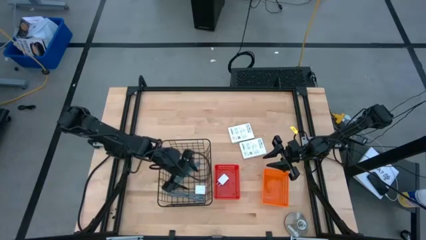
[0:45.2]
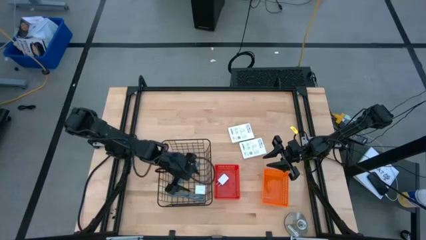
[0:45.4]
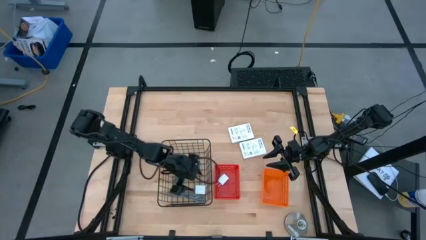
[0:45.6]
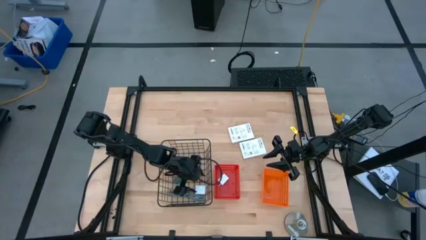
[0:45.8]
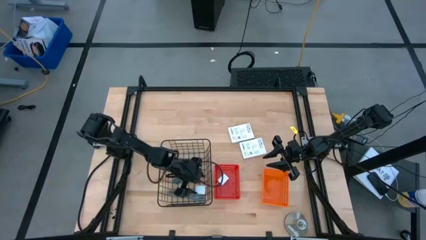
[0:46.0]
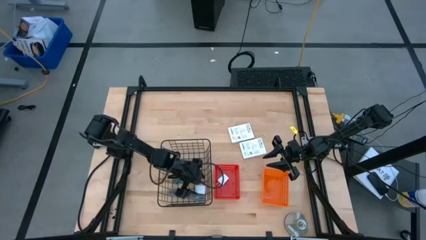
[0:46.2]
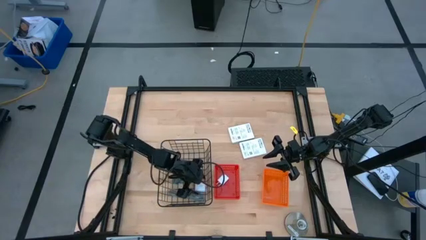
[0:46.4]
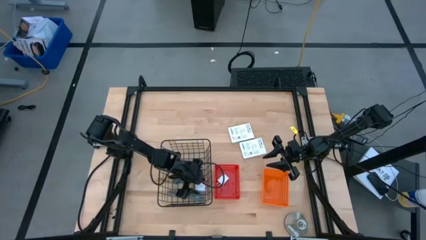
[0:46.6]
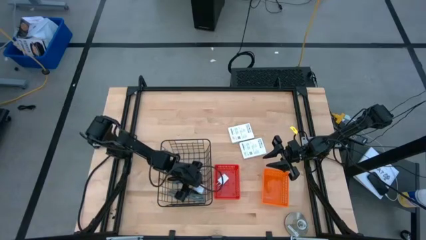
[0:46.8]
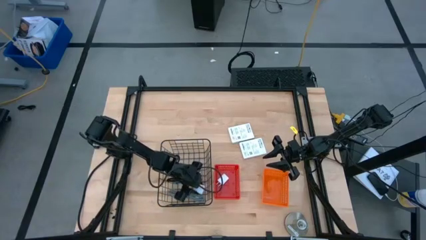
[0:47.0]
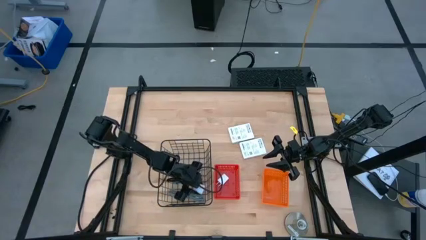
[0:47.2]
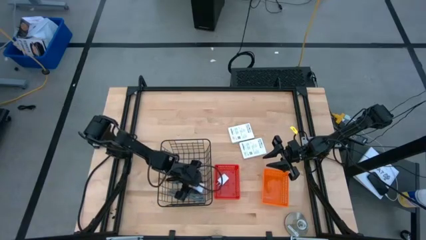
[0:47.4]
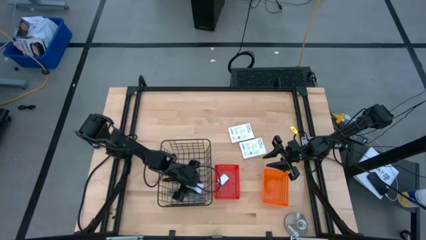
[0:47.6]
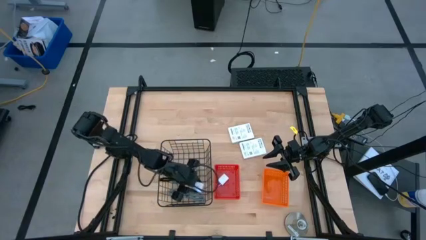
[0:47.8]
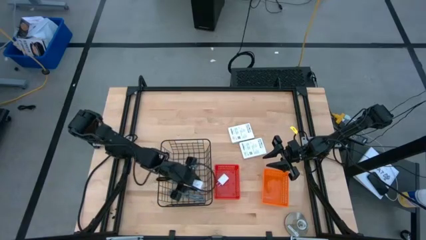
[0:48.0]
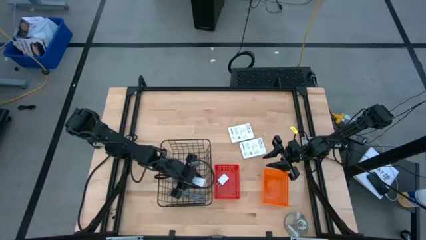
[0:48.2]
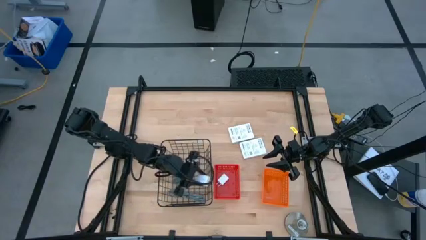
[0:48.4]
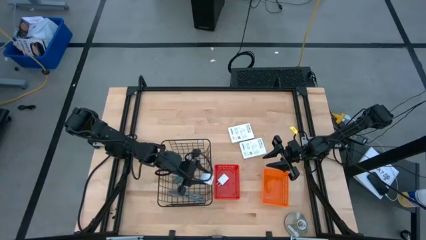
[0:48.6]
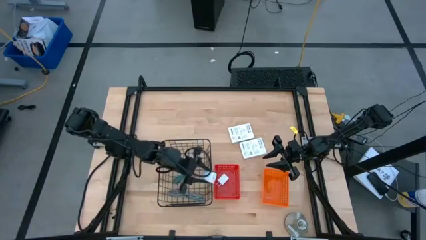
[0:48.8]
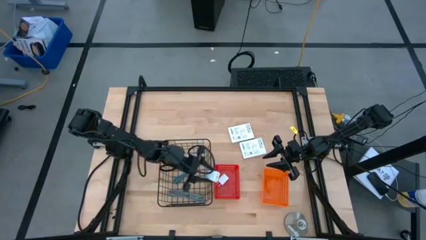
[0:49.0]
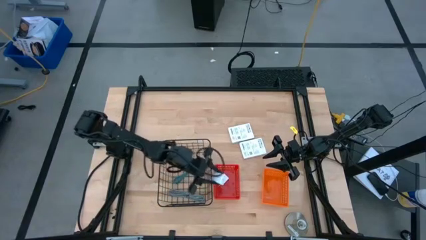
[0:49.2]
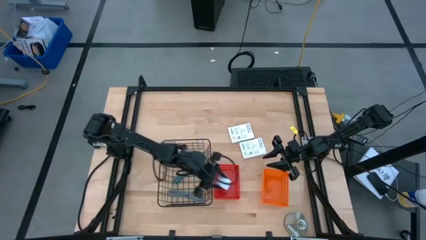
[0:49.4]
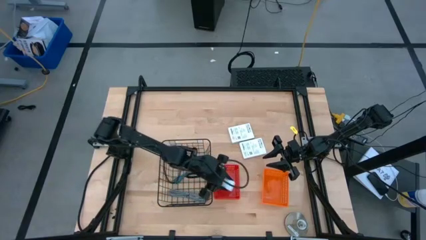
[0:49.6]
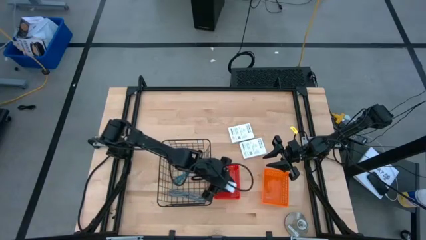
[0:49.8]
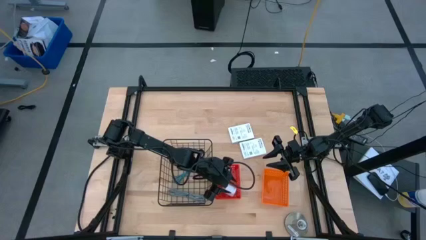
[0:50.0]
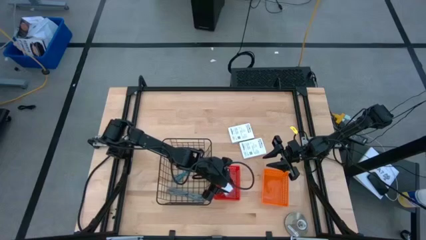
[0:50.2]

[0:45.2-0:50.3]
Task: Pick and place items into bin
Put the white charger adapter from the wire basket into the red basket

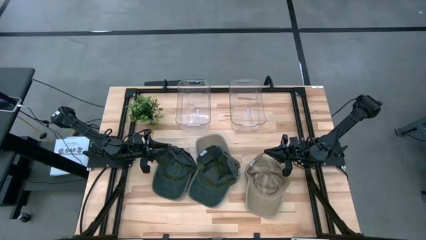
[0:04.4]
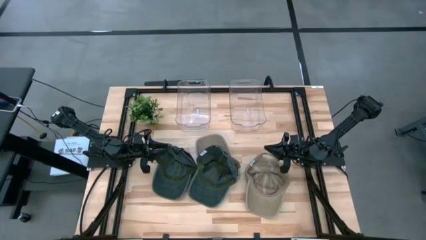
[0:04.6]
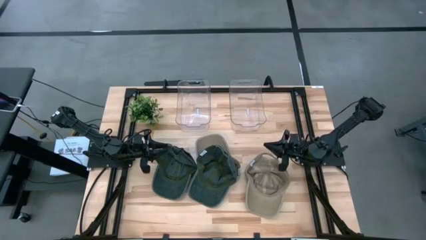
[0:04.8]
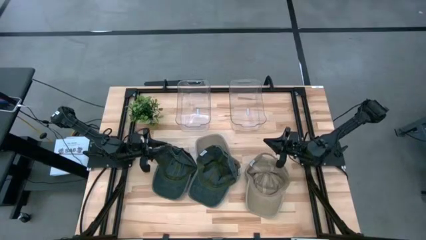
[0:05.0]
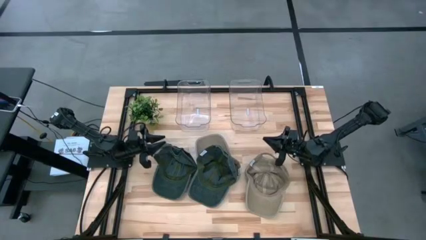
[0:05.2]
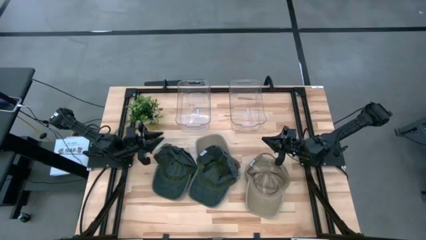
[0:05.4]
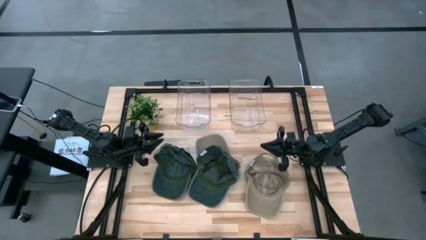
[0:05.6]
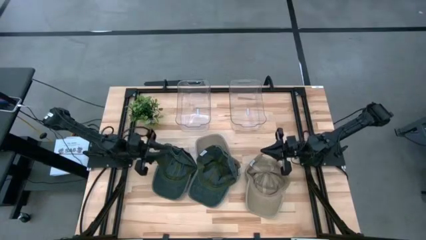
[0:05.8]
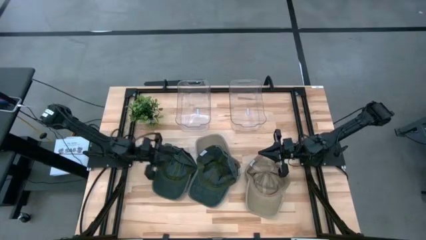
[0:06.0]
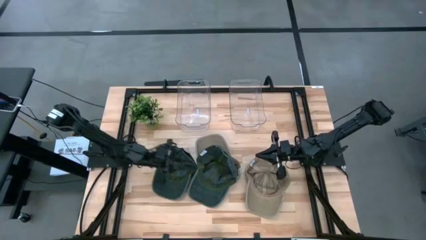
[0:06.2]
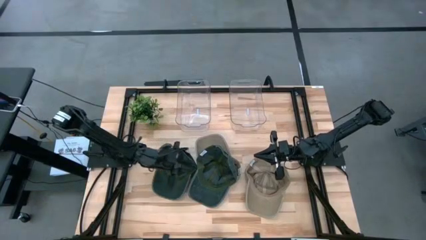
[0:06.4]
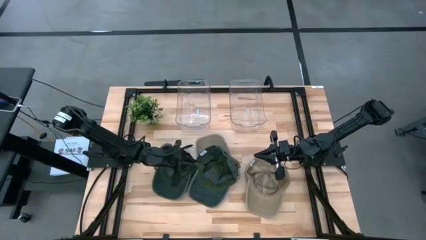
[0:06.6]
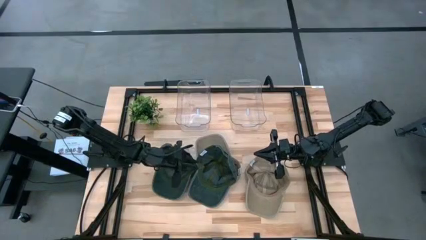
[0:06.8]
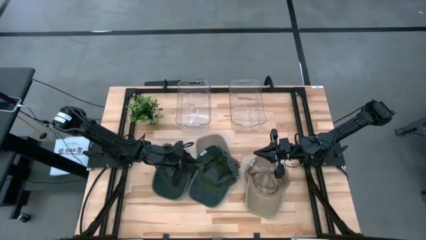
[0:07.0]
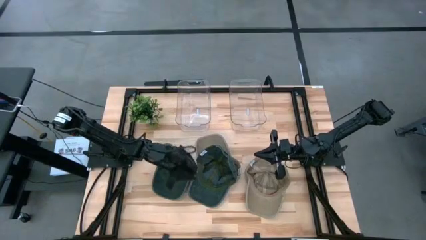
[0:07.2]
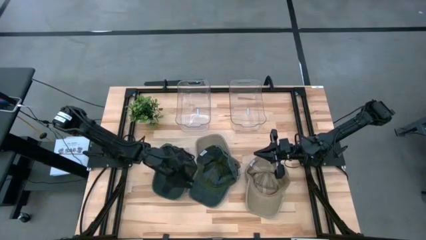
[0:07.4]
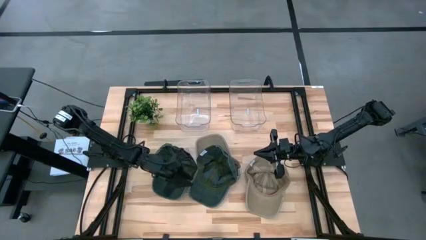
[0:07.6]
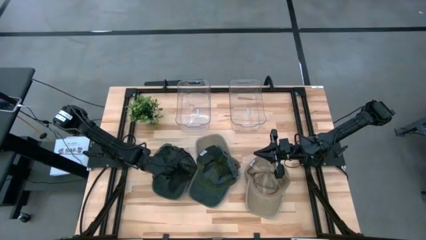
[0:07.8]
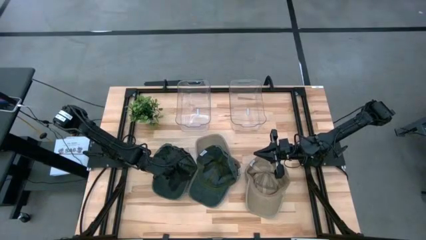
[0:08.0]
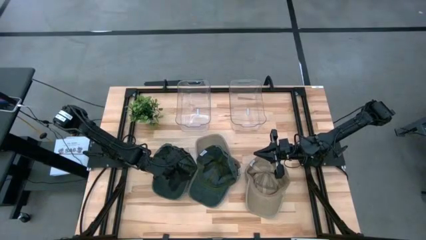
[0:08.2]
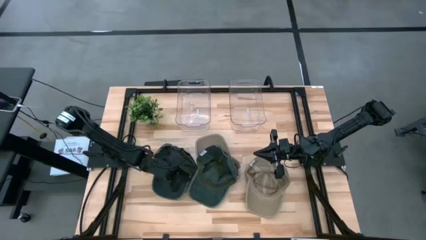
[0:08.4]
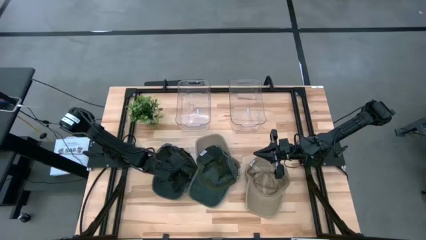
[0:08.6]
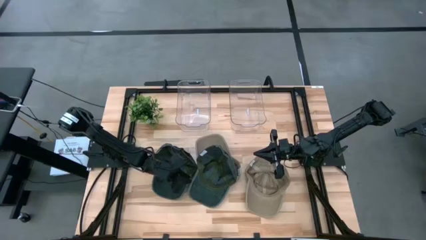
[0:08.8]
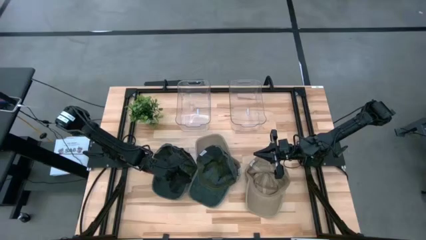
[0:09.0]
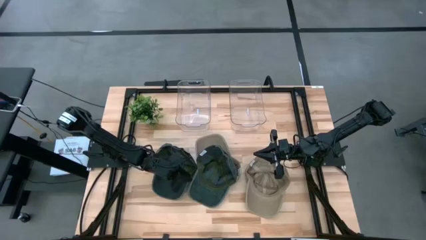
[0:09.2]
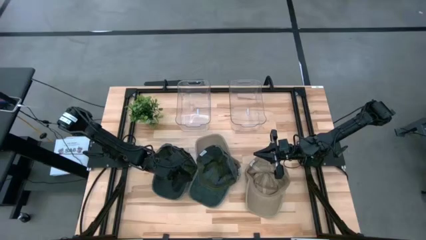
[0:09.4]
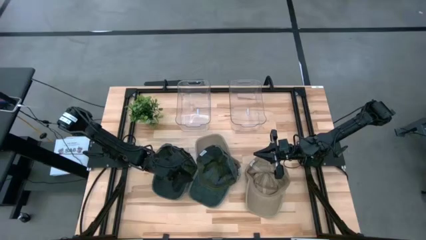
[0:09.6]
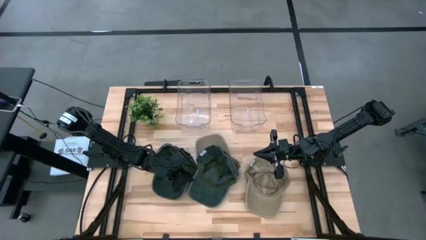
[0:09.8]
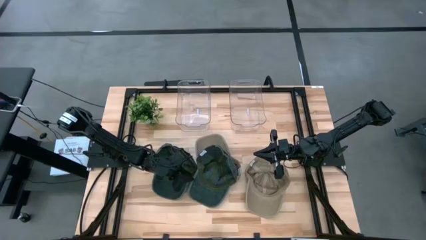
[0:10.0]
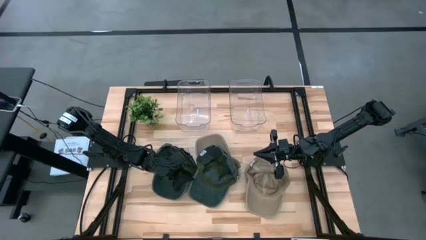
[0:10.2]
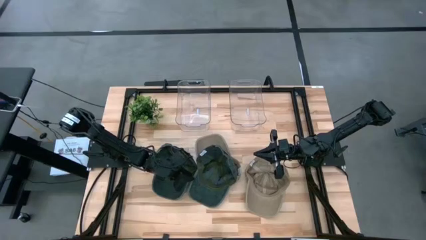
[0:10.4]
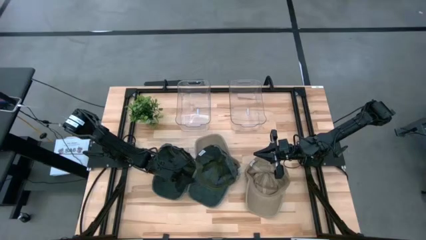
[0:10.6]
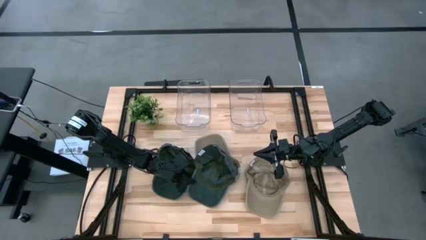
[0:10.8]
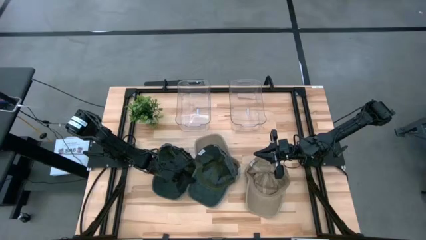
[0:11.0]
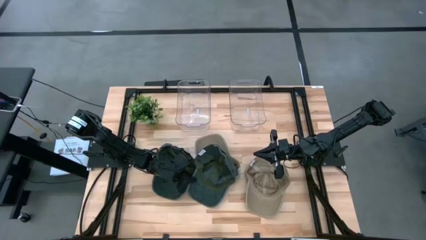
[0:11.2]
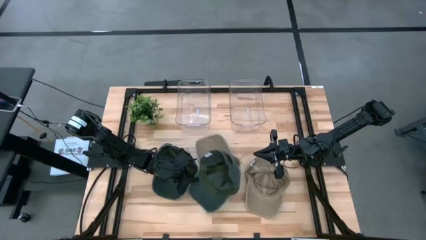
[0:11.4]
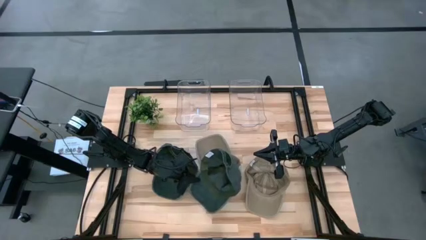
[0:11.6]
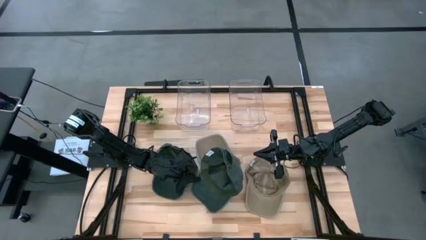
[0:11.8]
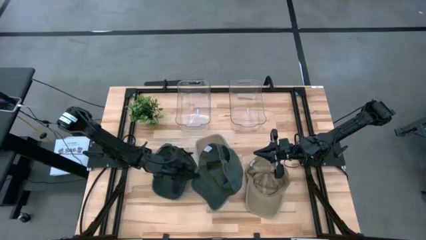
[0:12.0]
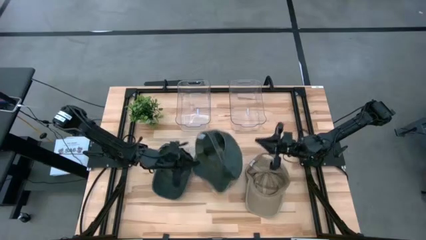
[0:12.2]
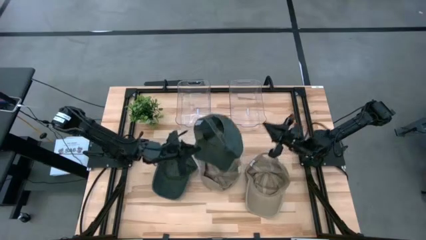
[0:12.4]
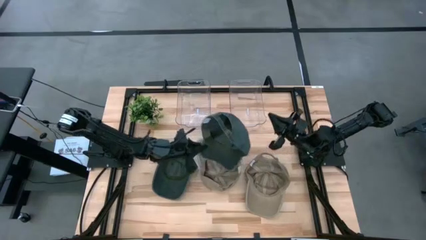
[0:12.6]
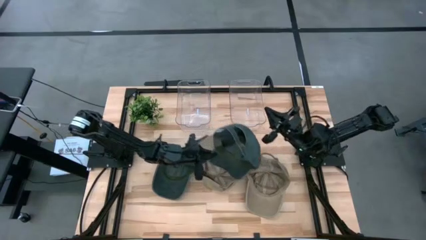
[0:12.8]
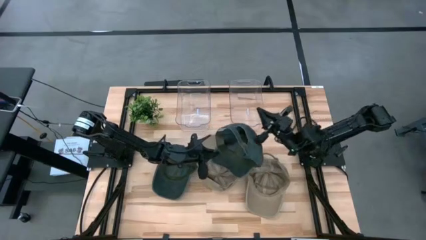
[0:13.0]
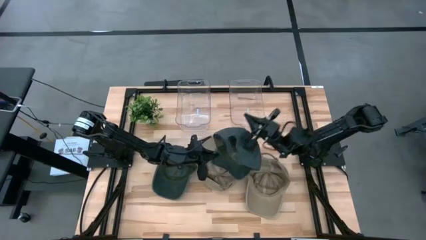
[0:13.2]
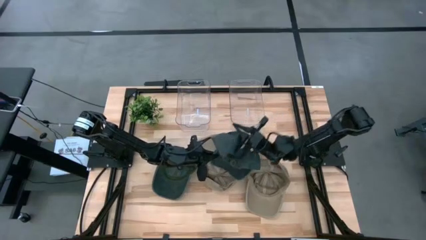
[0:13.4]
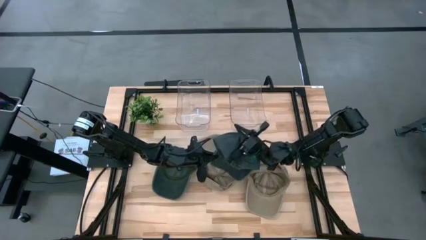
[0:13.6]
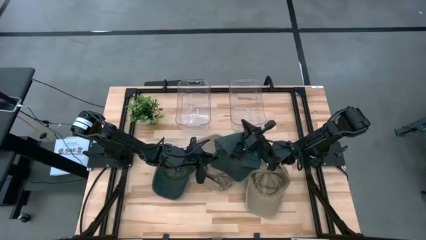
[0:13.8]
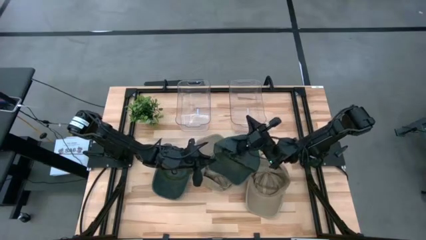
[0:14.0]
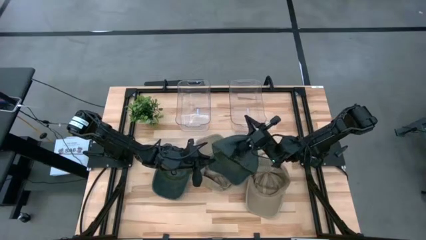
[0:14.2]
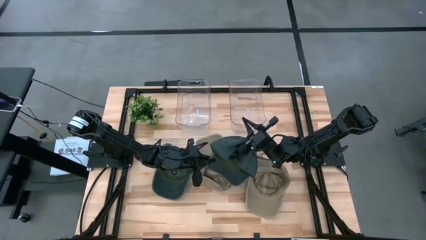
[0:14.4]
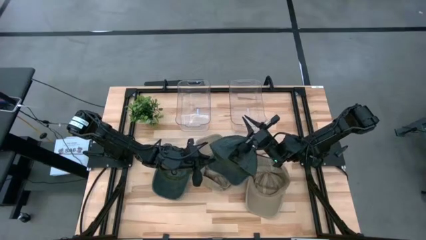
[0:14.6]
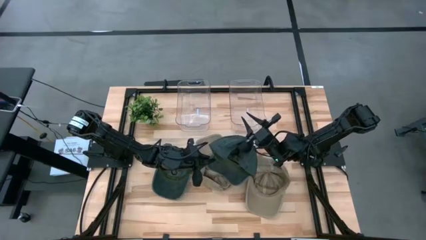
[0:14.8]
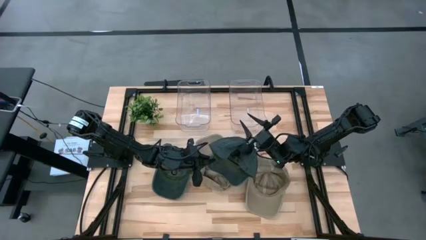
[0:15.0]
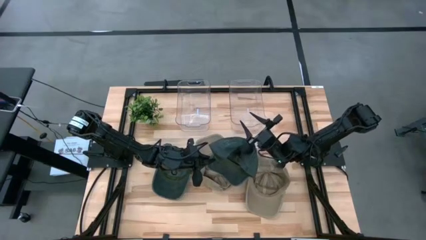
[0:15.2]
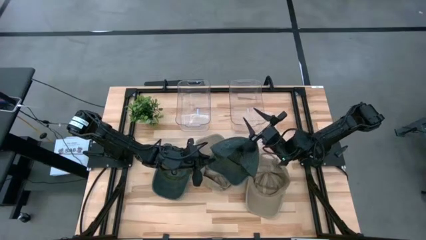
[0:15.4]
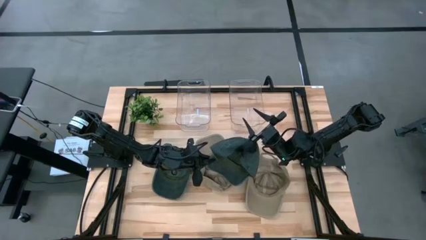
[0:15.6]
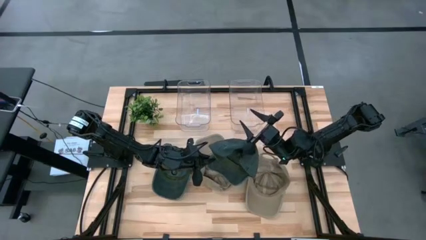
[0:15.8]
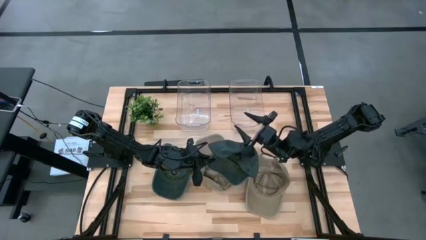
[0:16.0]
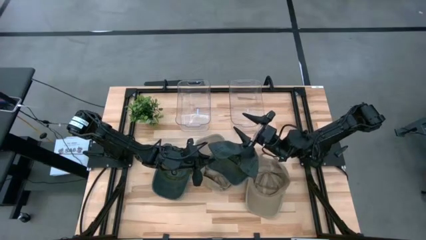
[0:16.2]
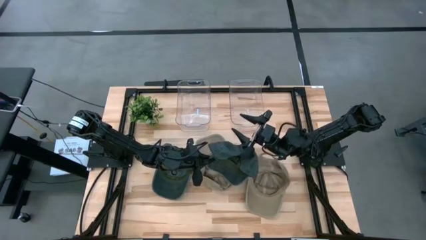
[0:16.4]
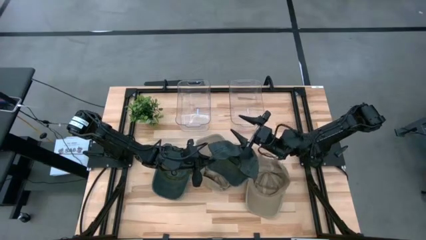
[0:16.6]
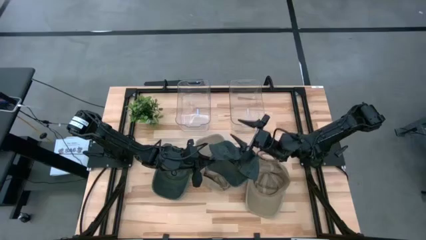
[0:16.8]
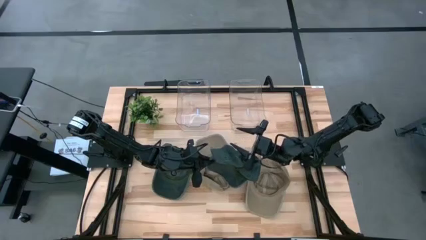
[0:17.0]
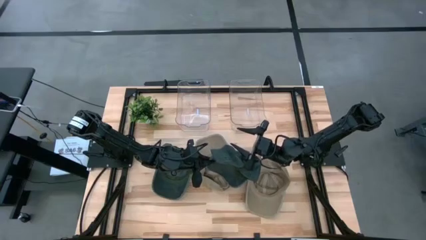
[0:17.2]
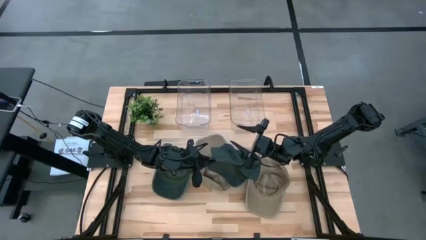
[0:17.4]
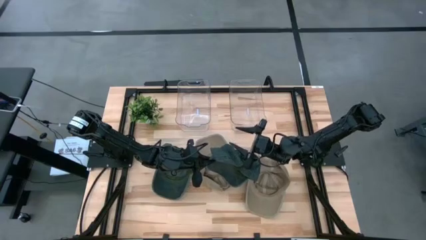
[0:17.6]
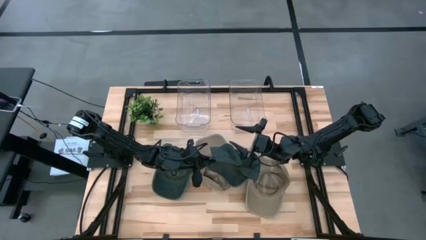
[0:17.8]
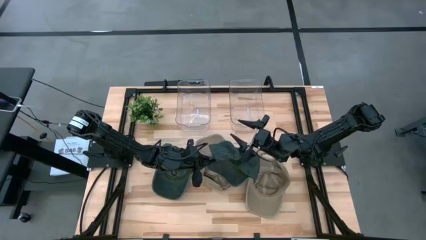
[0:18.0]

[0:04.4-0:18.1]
Task: Pick & Place hat
Put the right black cap into the right transparent bin
